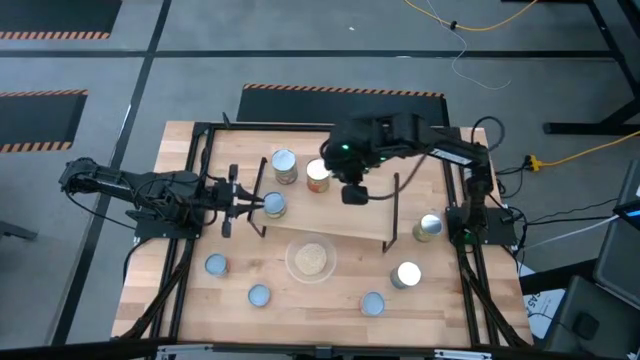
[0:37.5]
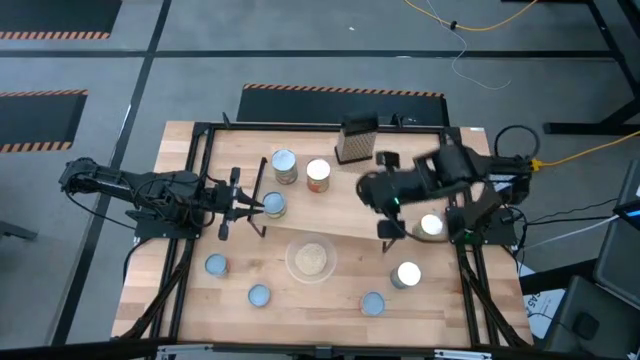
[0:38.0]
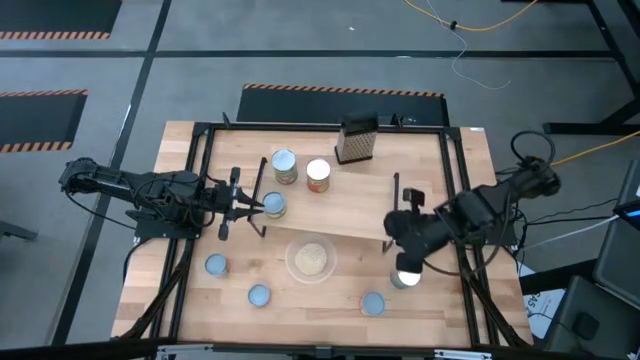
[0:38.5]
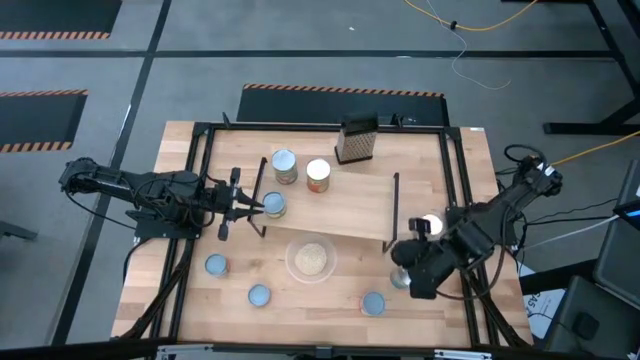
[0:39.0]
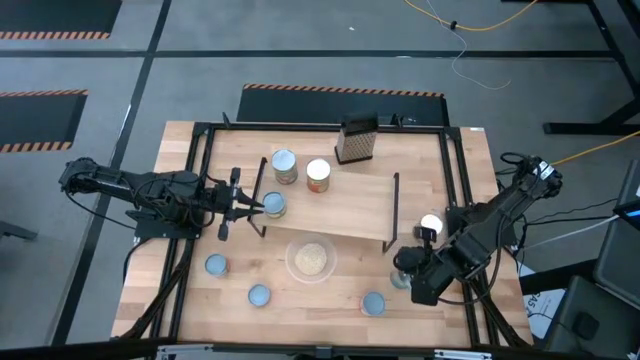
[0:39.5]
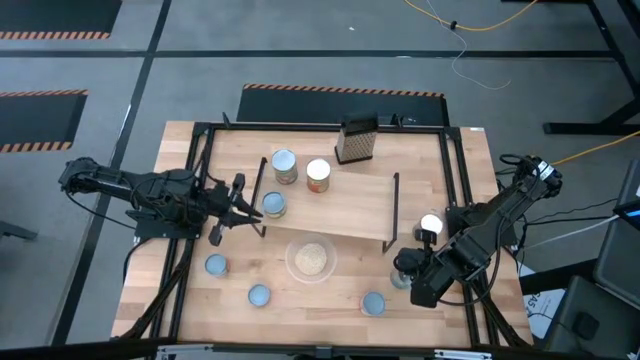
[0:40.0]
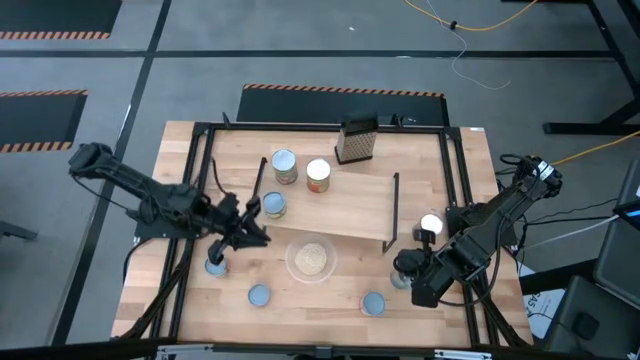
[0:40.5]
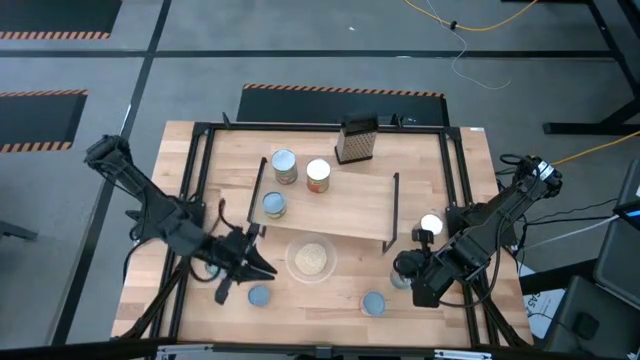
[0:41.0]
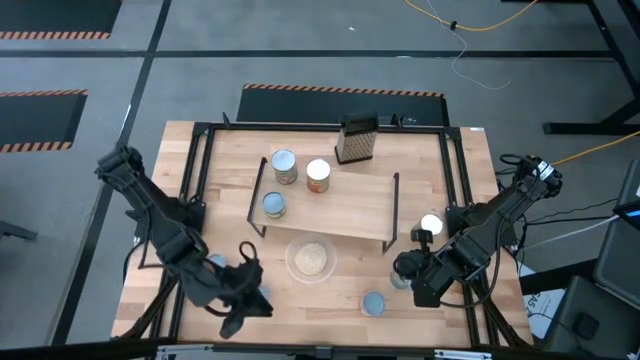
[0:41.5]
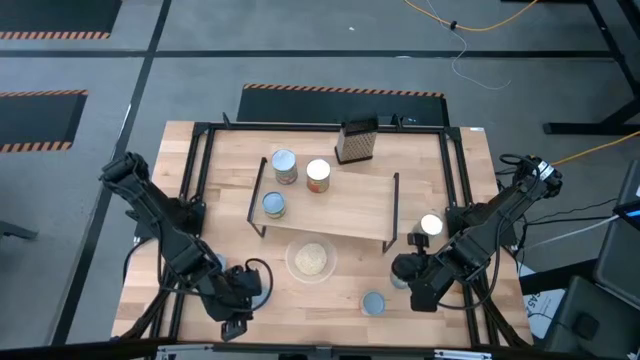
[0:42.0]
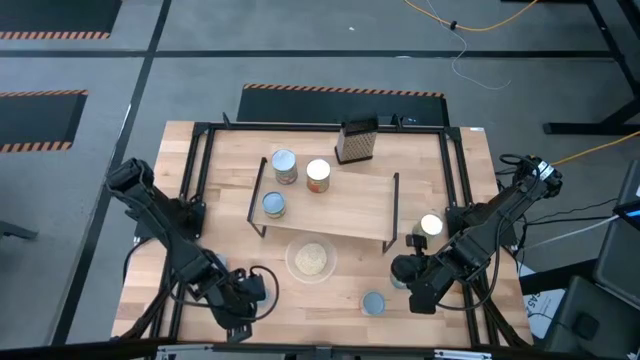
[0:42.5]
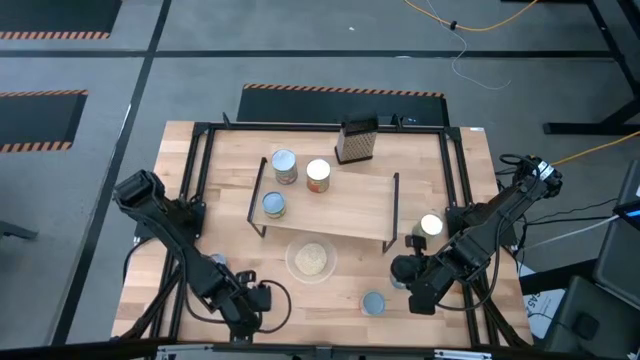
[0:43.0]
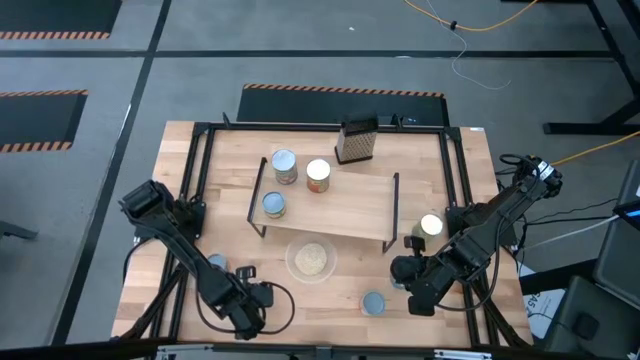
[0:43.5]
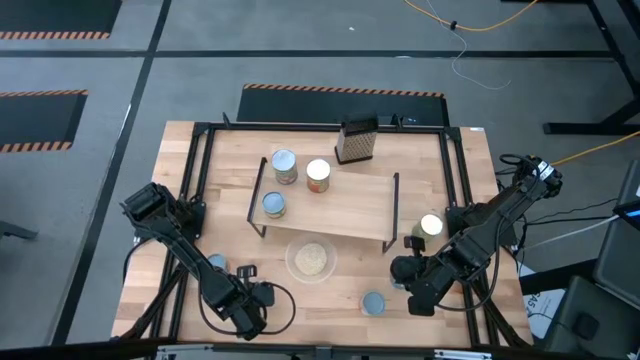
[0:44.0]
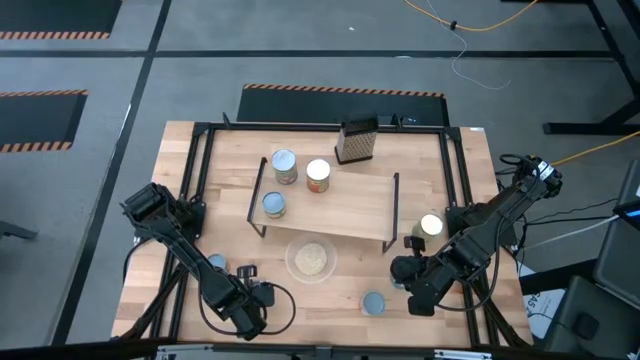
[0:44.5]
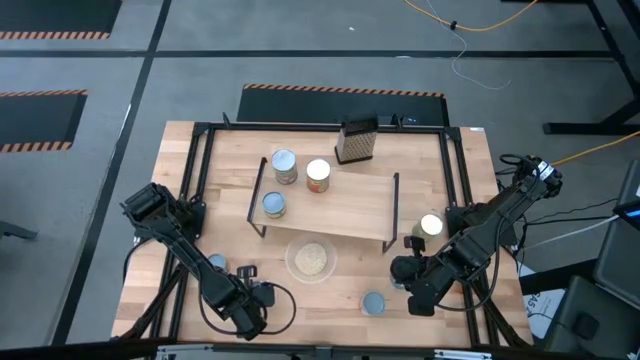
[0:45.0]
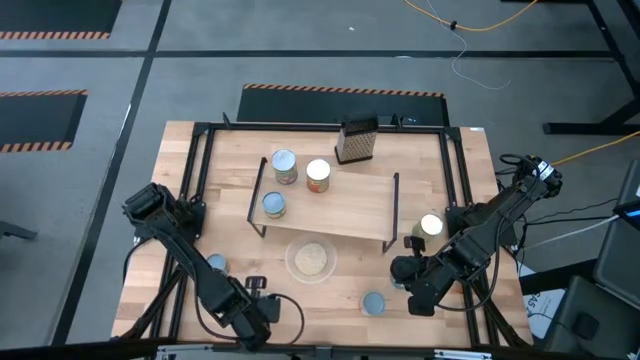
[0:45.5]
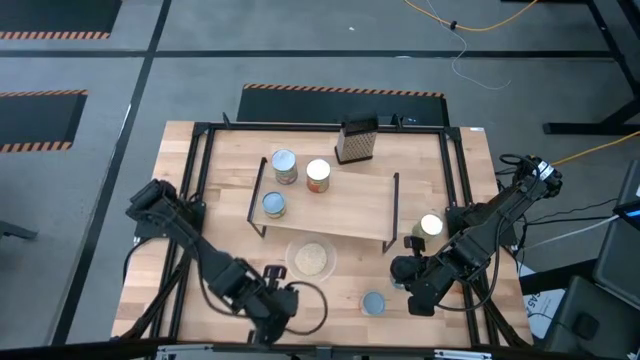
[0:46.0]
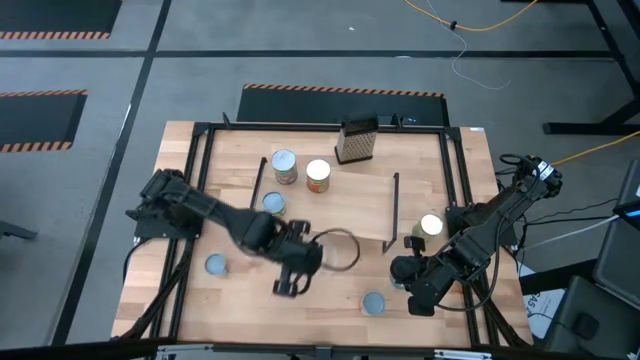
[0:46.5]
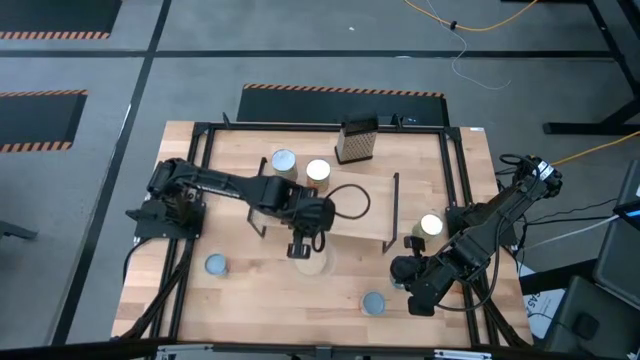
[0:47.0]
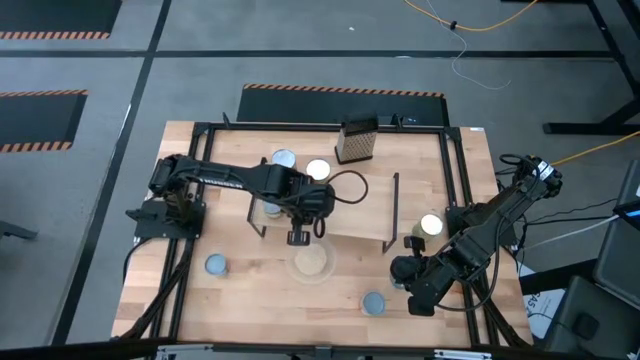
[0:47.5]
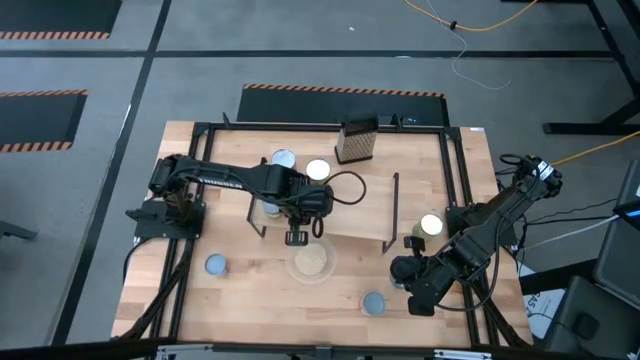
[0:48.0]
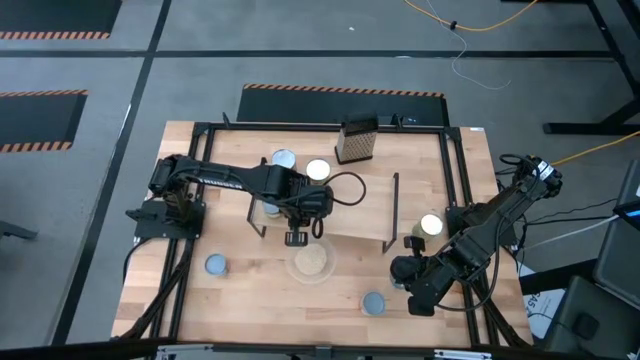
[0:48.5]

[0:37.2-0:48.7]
Task: Pick and place cans onto a shelf
Put the small canned pineapples on the shelf

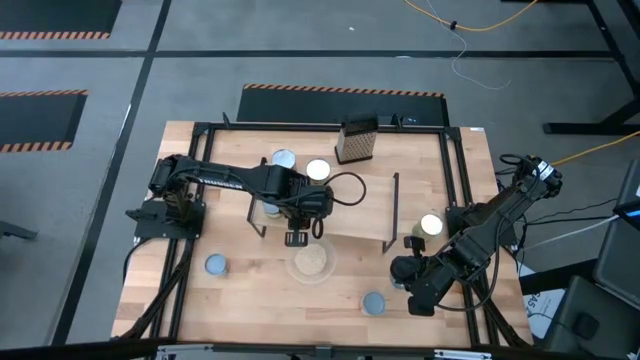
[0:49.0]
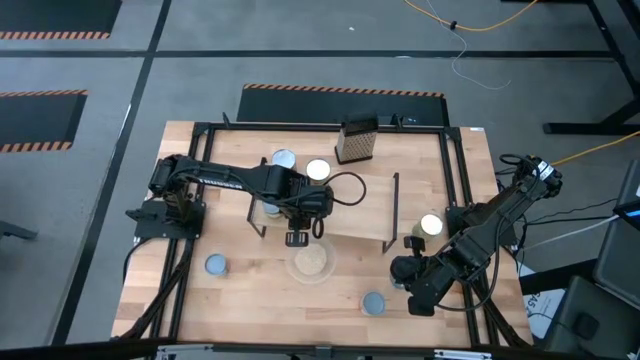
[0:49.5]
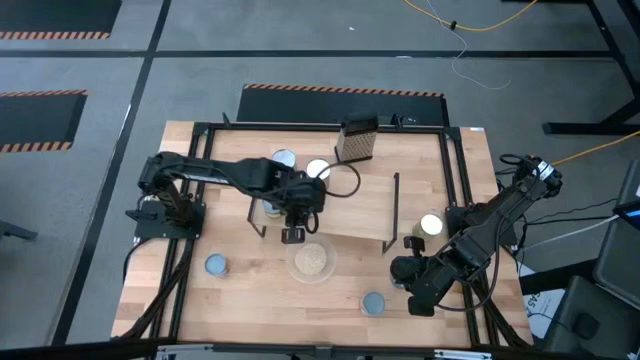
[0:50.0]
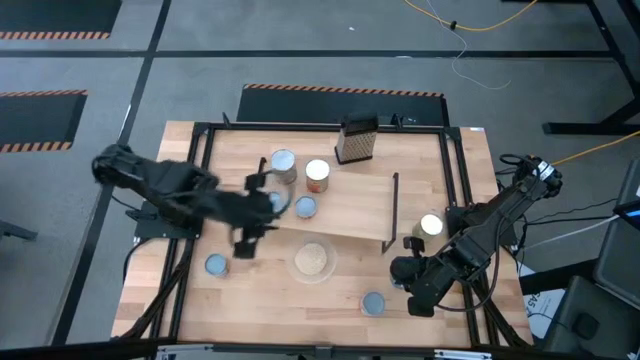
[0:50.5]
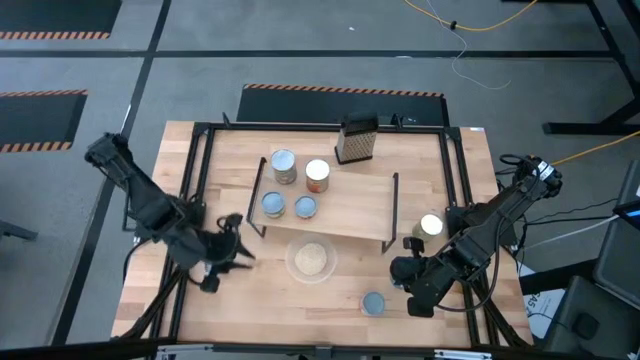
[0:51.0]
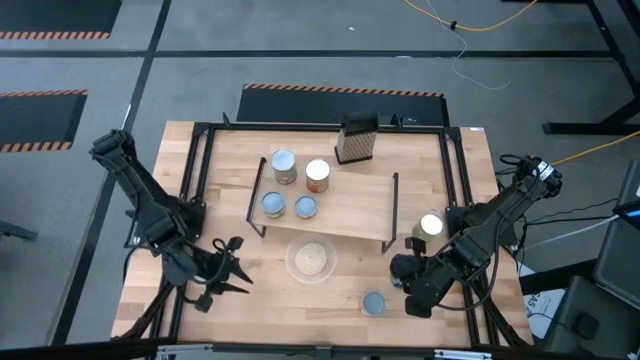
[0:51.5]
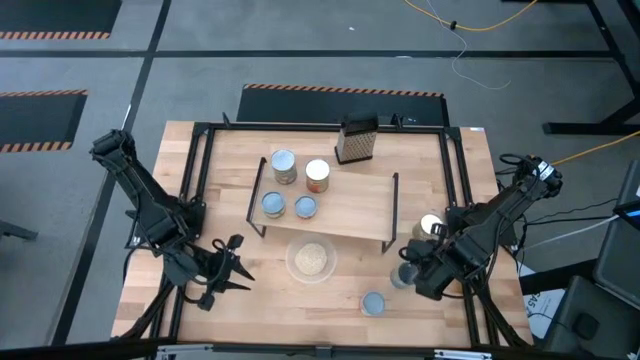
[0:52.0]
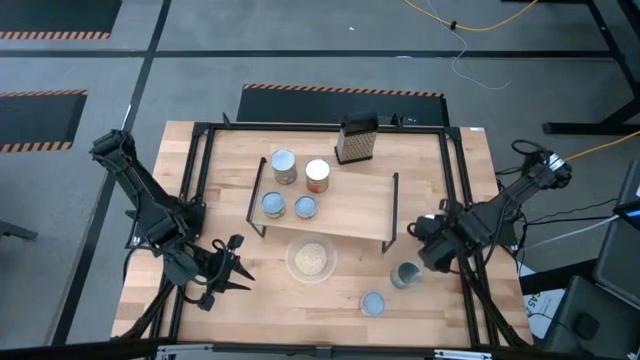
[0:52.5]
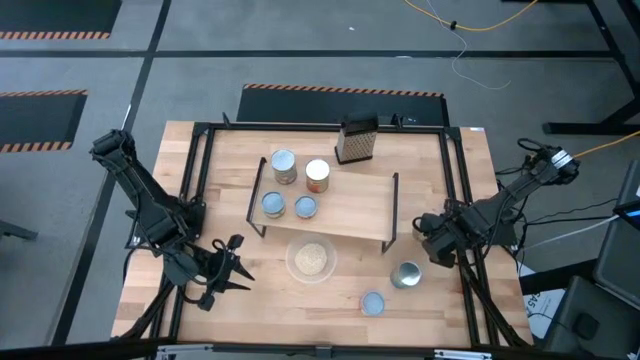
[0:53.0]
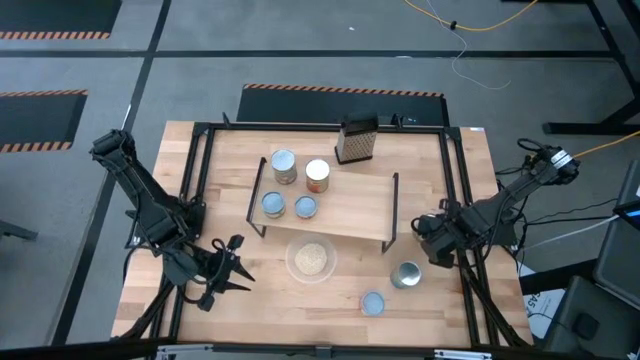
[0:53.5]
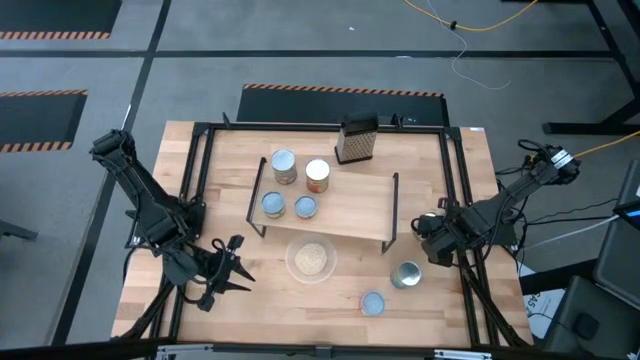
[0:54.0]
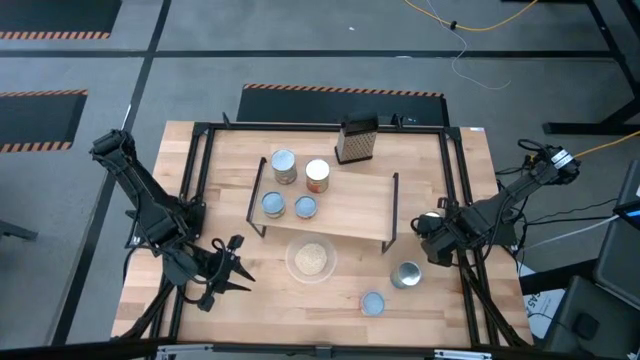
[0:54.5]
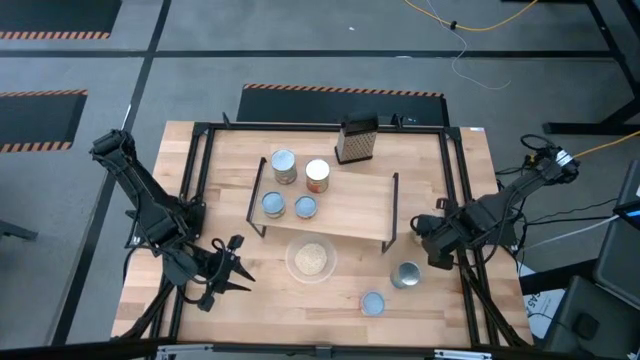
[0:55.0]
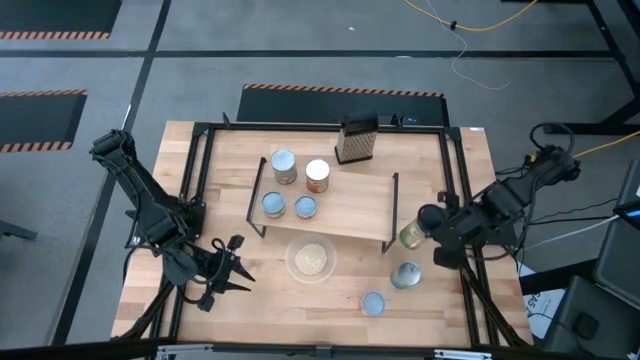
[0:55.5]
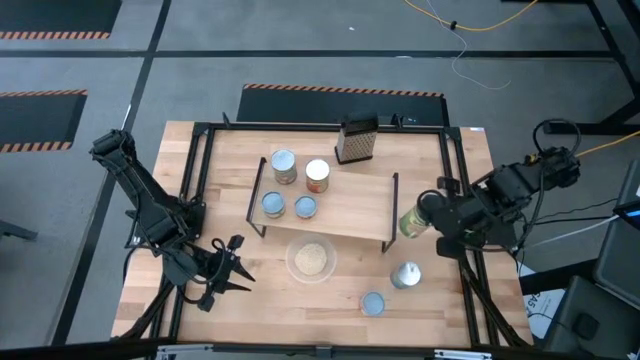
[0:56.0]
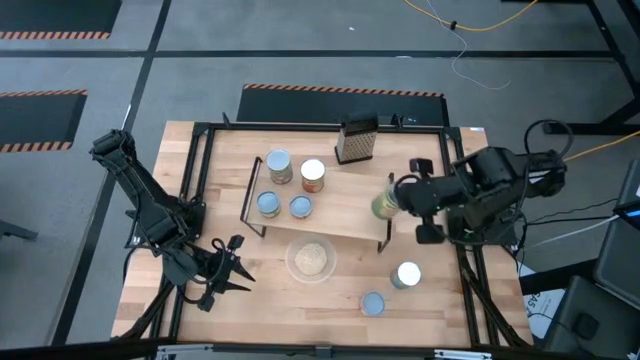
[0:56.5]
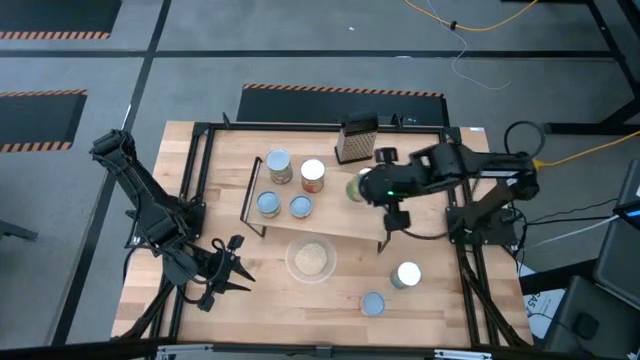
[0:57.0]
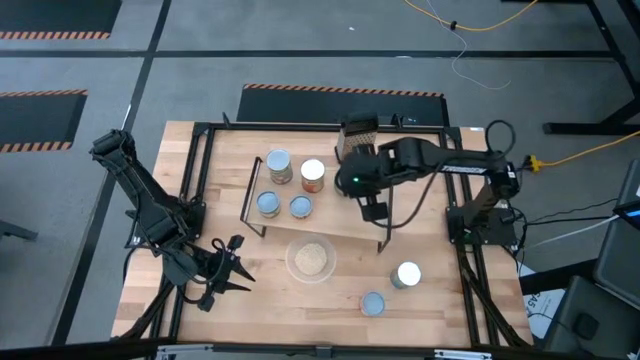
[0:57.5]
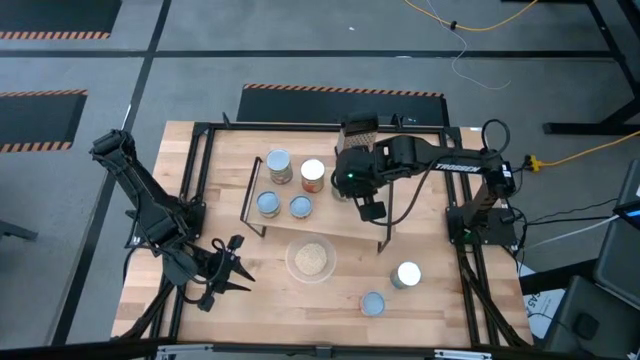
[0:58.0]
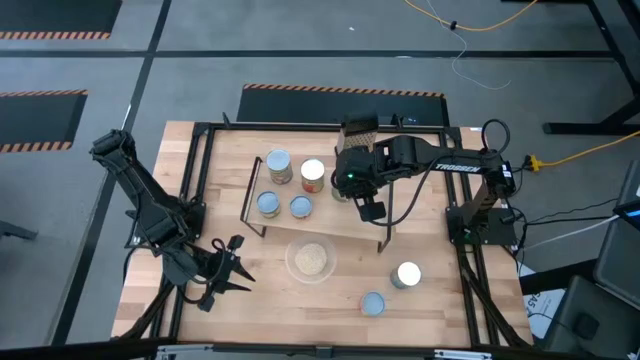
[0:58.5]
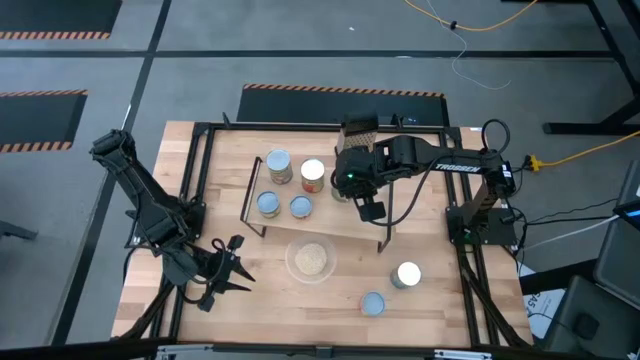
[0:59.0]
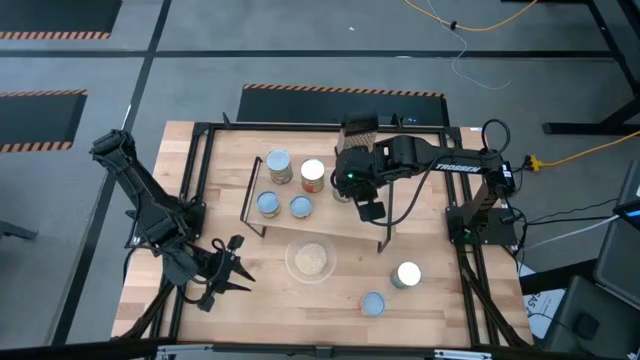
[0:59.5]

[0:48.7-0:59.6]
Put the large canned oranges on the shelf
